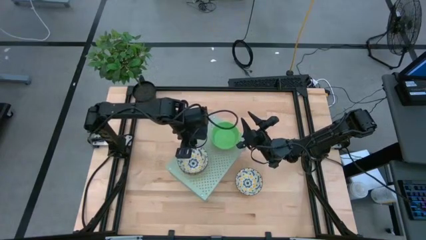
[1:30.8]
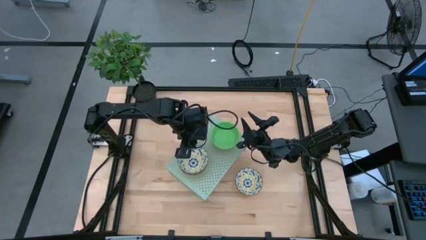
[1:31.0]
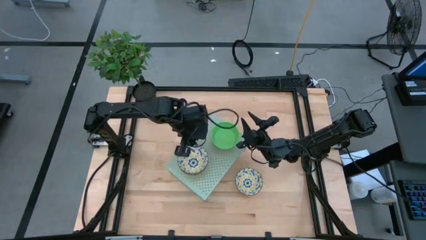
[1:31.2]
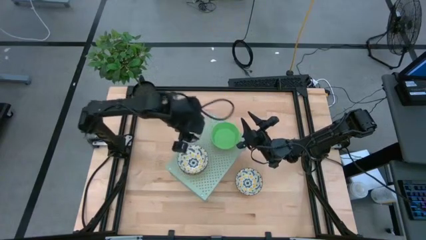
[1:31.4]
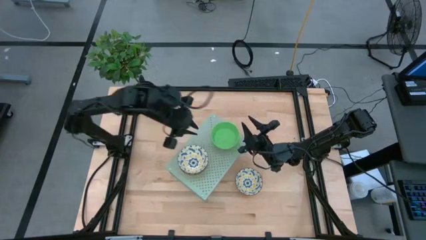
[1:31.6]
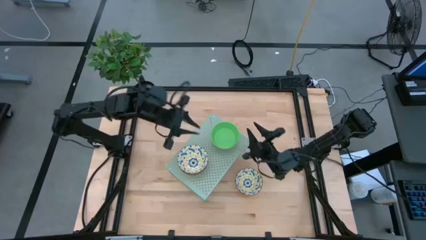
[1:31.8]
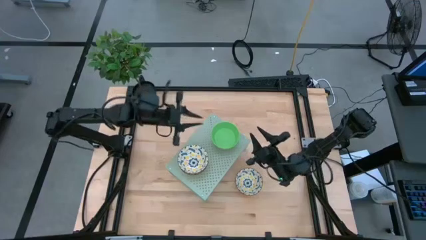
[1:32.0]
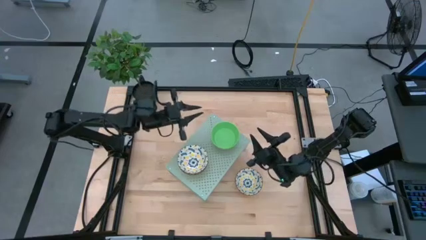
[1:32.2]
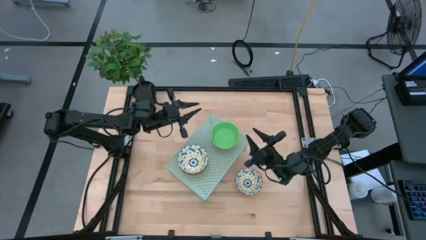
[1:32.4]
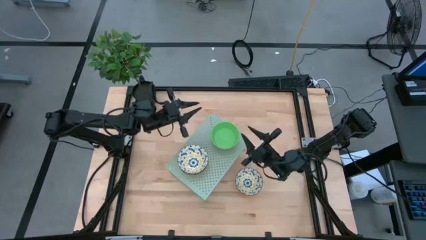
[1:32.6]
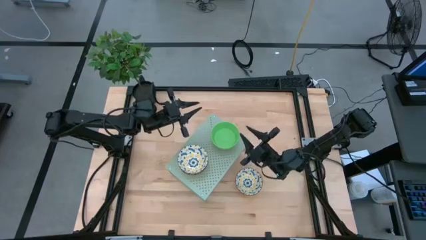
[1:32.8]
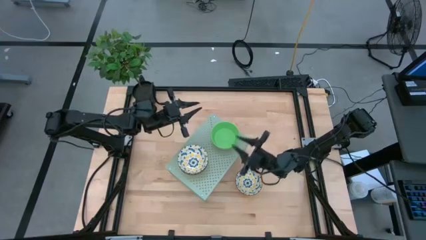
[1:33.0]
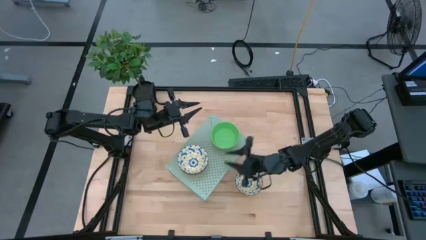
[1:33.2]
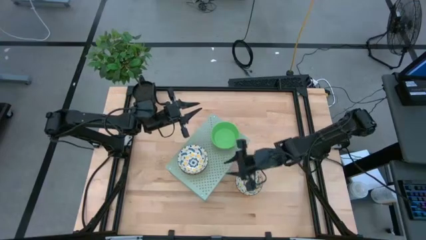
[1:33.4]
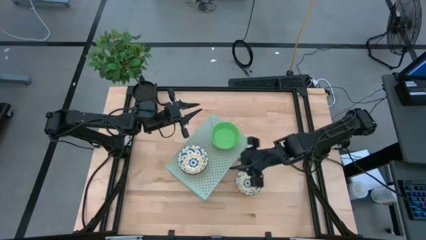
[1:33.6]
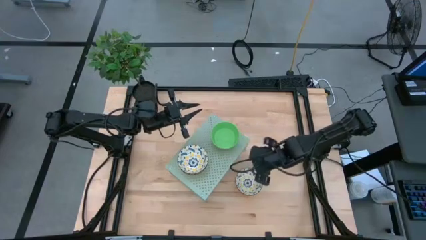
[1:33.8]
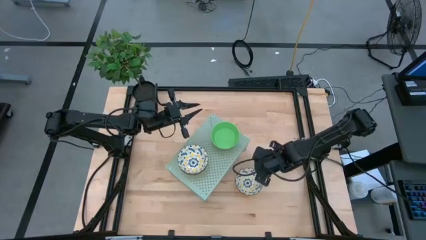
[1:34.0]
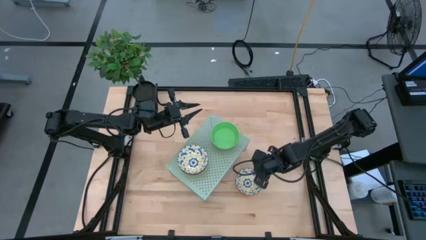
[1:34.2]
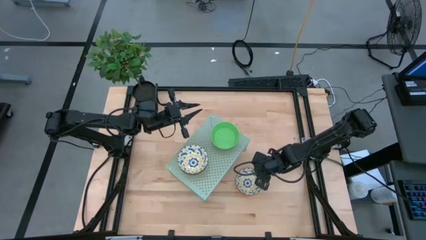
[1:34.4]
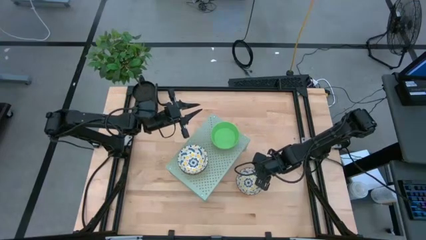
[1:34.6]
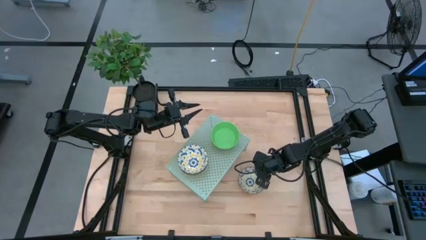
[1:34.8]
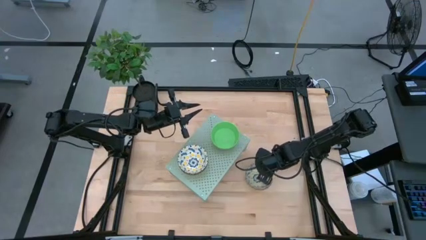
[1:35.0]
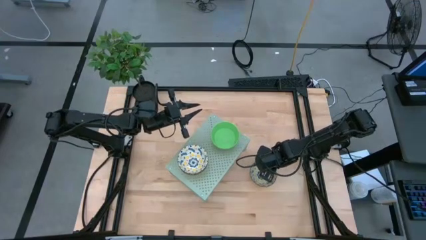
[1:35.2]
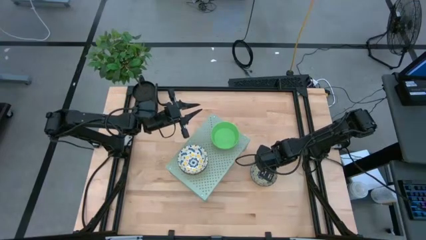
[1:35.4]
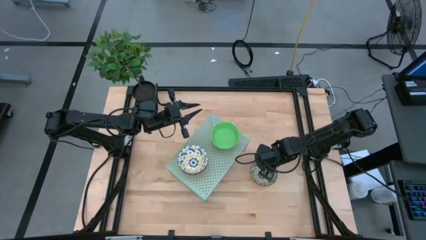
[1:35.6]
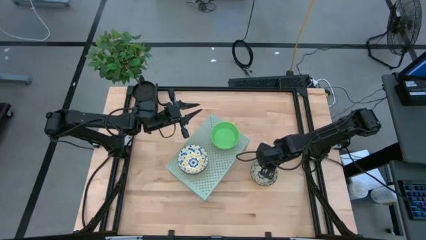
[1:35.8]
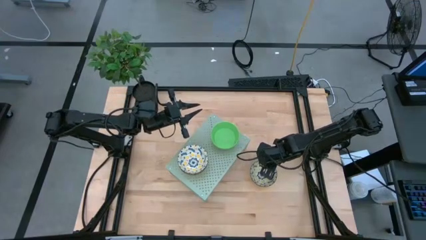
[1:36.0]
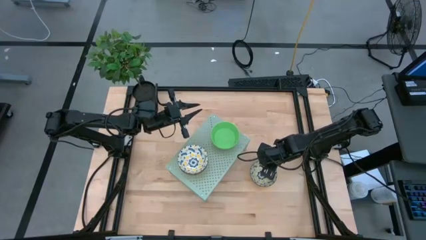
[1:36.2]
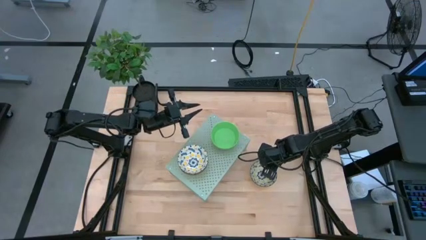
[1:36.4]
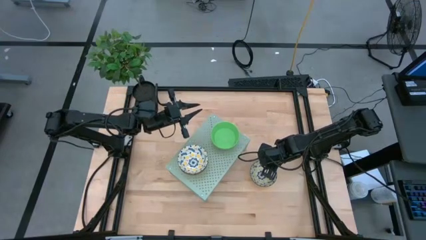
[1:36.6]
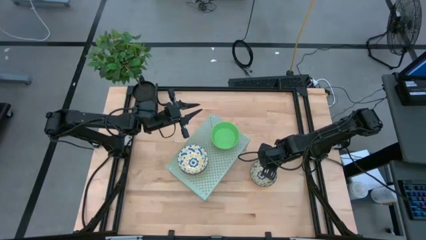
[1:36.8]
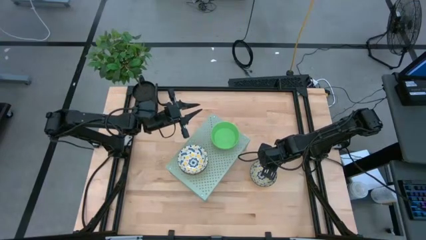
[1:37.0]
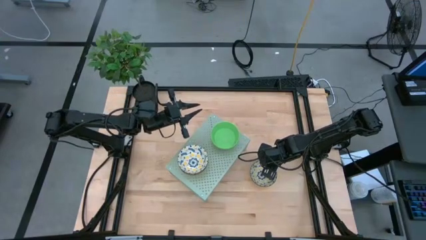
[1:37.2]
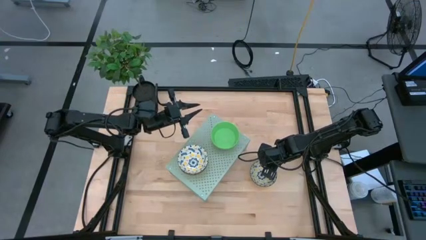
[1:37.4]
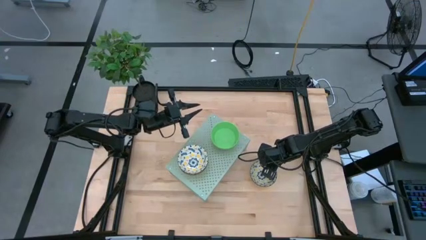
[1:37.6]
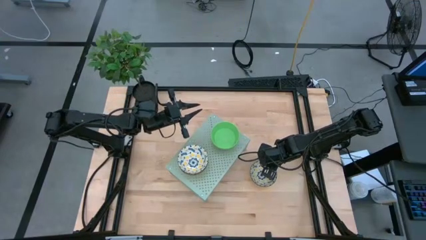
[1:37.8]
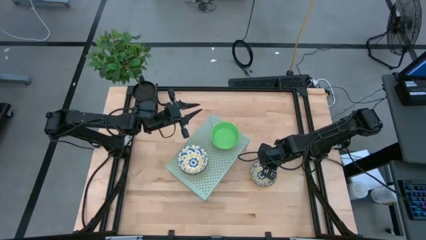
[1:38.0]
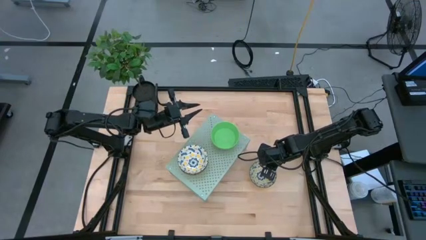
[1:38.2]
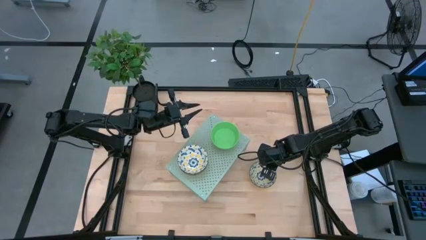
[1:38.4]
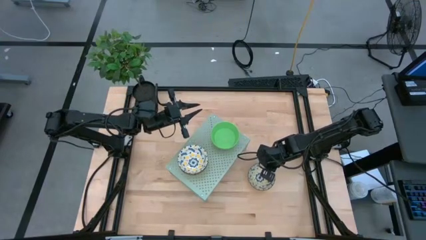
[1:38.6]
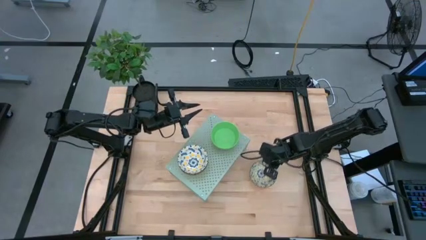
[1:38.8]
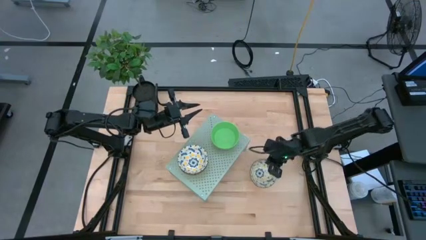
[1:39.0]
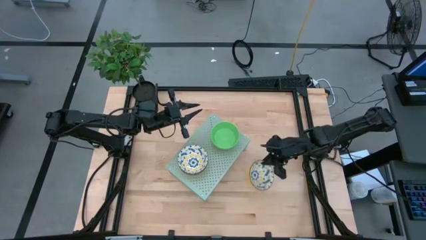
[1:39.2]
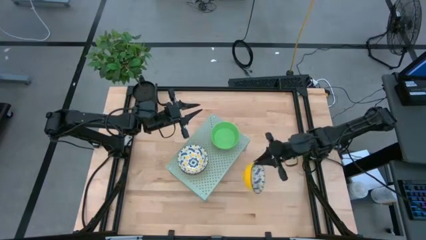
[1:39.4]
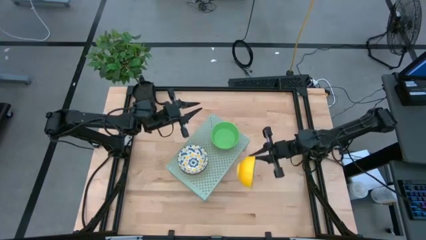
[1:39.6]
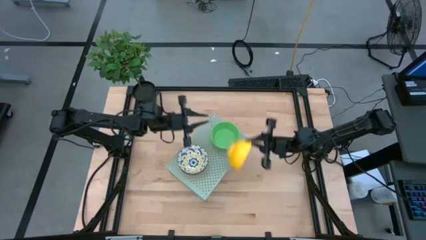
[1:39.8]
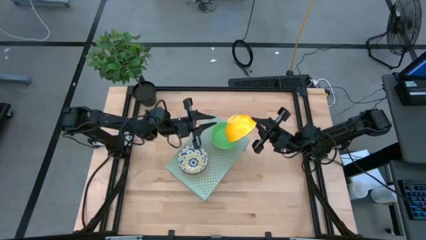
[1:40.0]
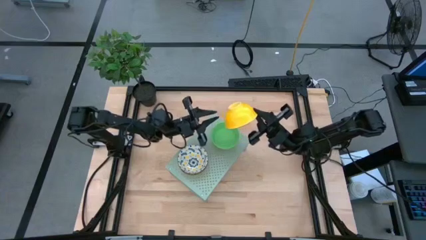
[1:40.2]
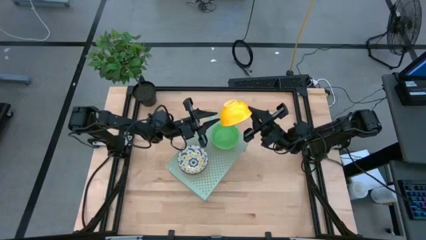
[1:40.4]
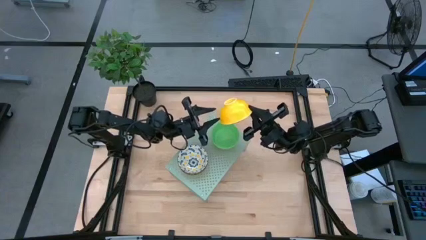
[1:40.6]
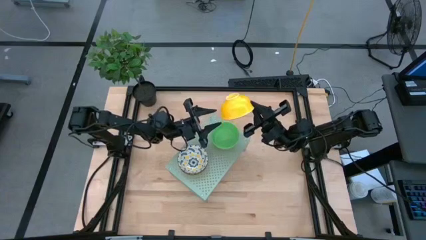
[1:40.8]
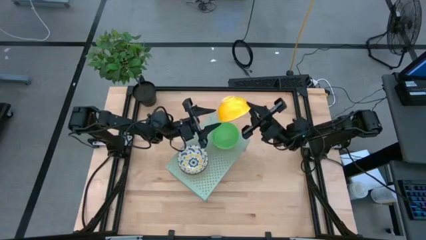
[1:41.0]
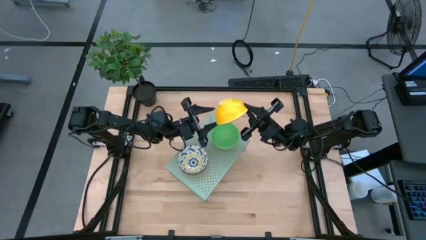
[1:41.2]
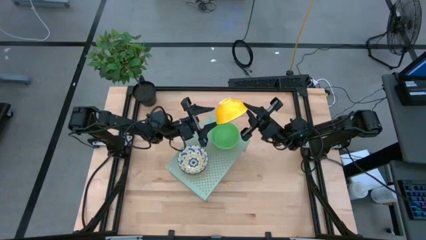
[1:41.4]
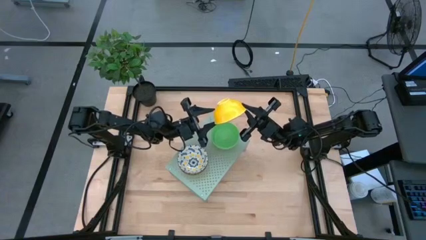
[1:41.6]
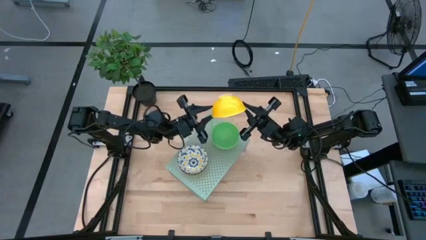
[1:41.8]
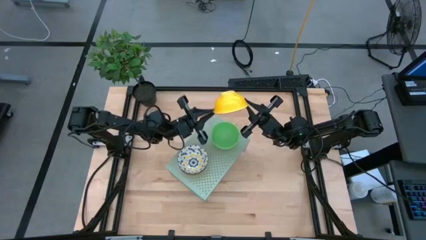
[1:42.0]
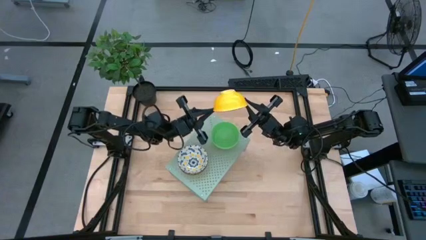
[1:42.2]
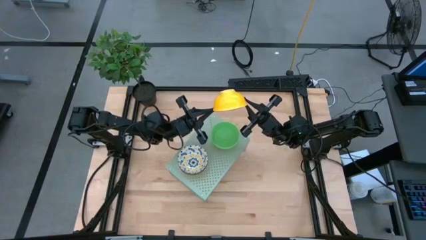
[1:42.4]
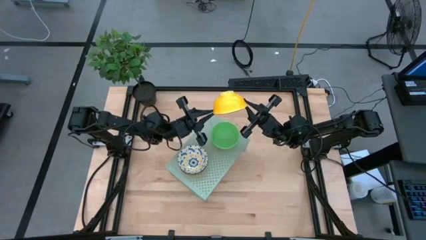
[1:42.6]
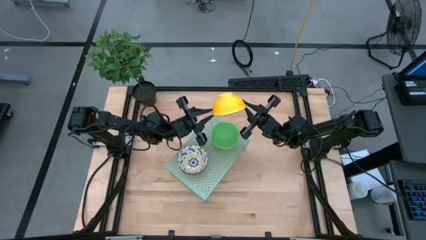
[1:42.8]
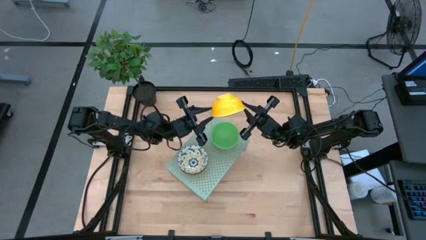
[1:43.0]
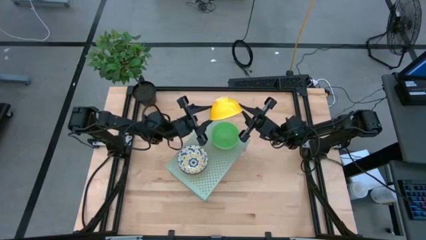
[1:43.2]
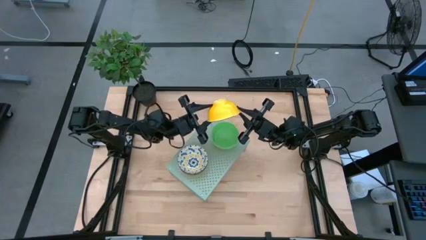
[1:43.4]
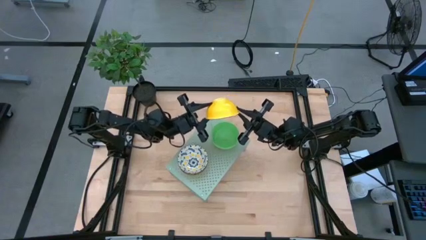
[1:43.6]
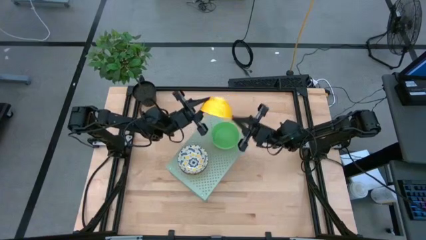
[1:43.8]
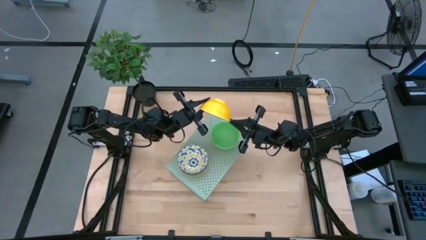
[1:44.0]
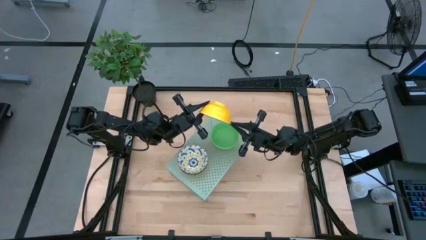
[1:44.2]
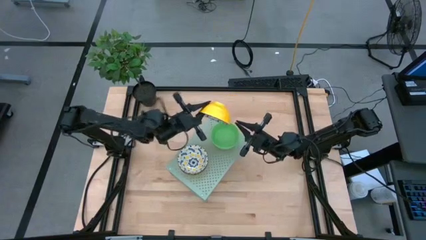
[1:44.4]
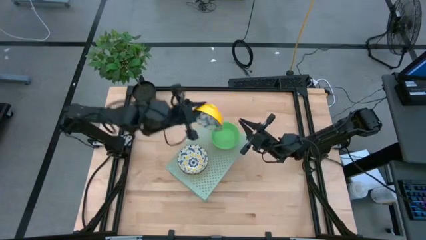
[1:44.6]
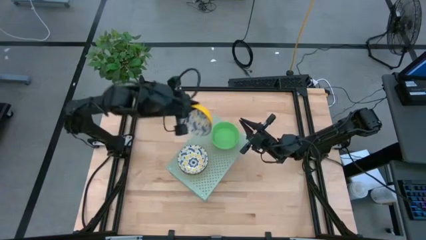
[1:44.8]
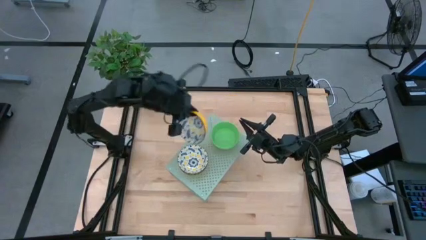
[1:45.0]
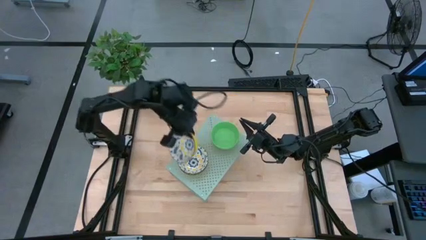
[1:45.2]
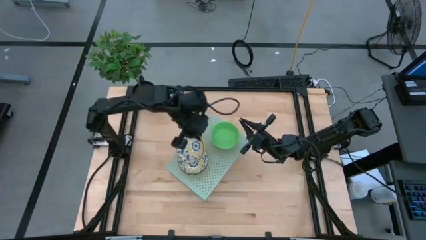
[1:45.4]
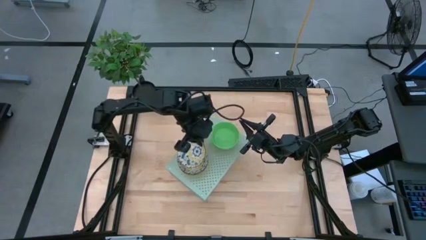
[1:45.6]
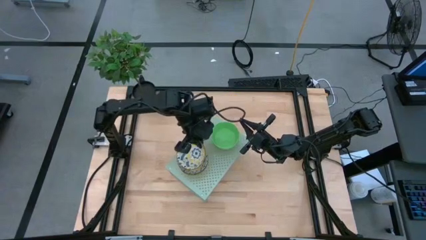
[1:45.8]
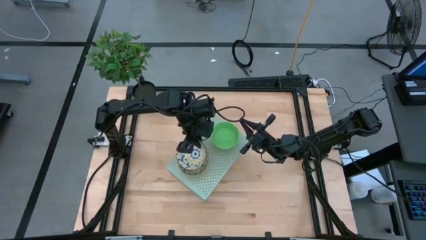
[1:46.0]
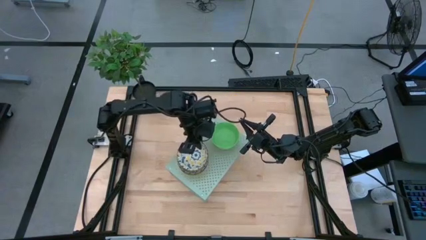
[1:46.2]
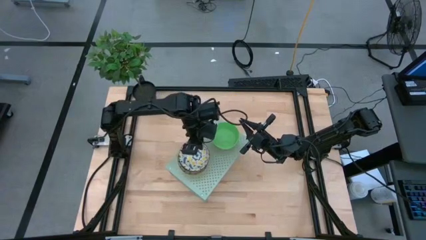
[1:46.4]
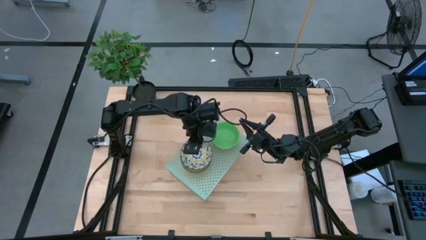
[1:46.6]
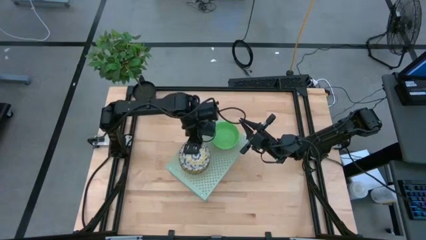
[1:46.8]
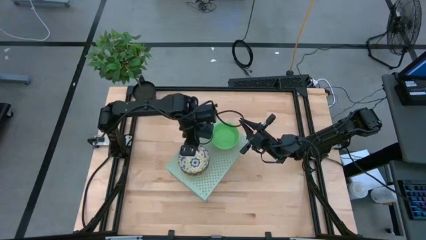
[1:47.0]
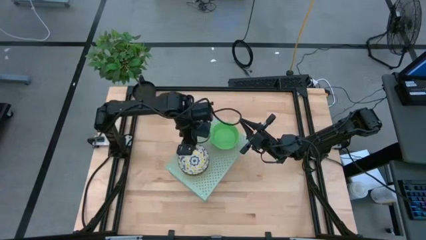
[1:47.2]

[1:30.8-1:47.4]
Task: Pick & Place Mini bowls
Stack the patterned bowl on the patterned bowl on the shelf

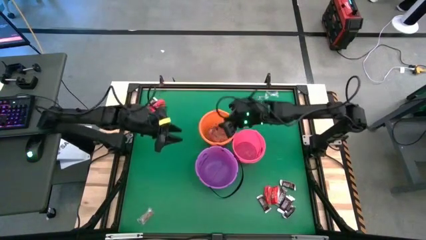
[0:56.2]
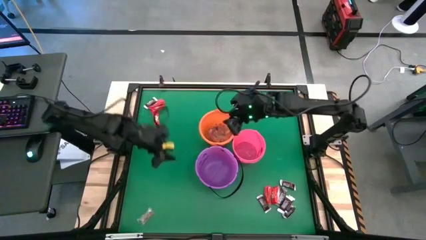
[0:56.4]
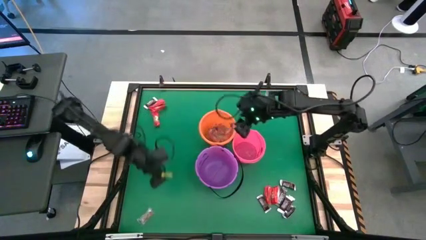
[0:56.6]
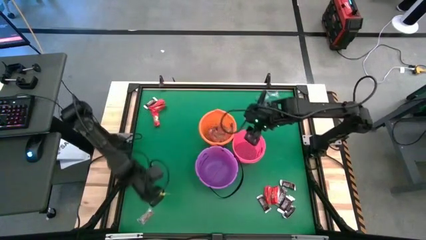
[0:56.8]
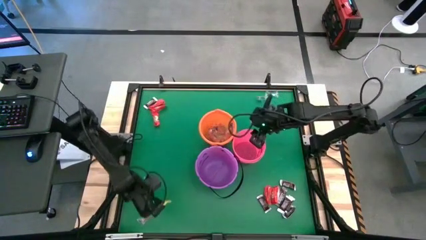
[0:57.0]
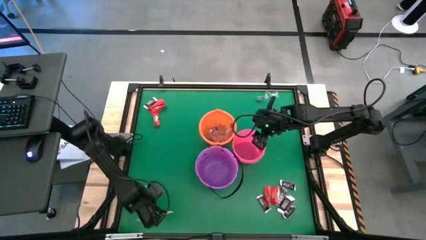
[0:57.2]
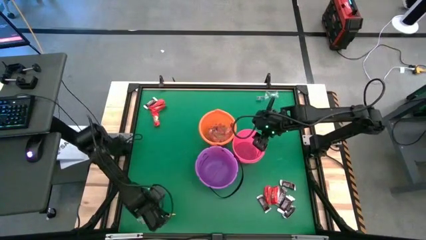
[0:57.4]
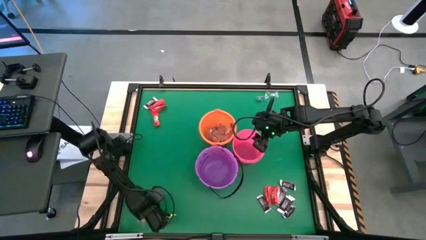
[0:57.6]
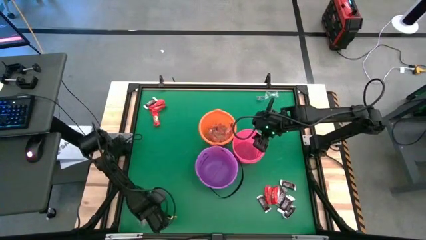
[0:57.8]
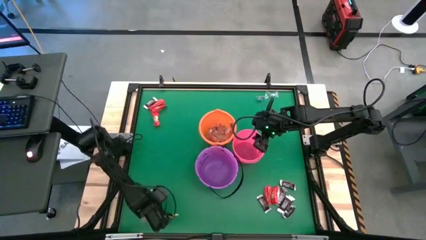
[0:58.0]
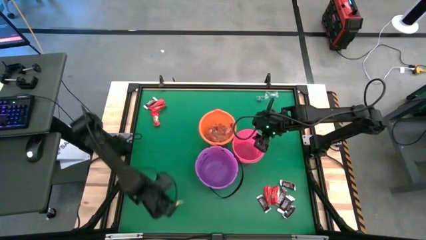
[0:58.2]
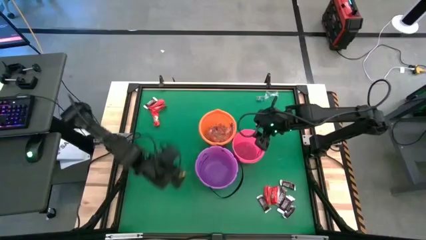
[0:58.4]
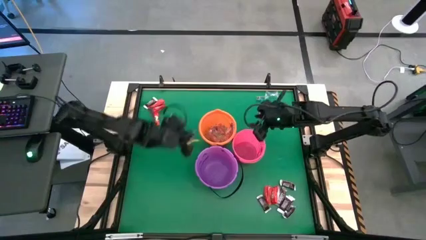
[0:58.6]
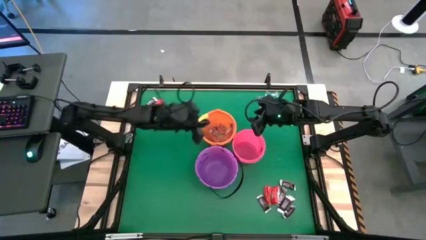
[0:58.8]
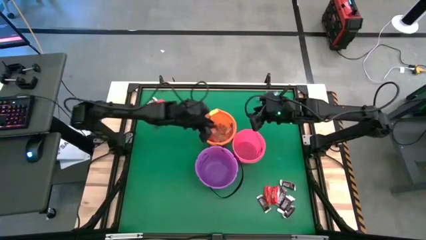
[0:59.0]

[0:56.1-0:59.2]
Task: Sort candy by brand, put in halloween buckets
Put the orange gummy into the orange bucket
